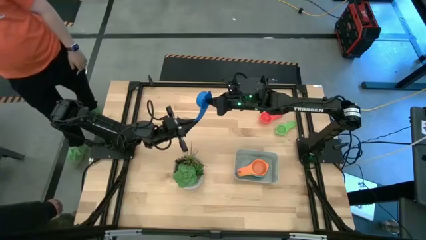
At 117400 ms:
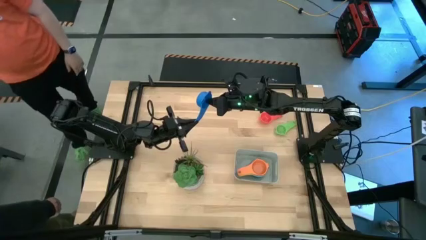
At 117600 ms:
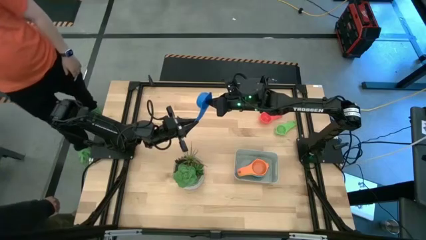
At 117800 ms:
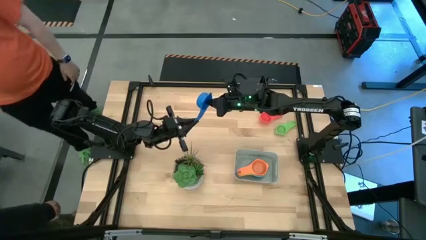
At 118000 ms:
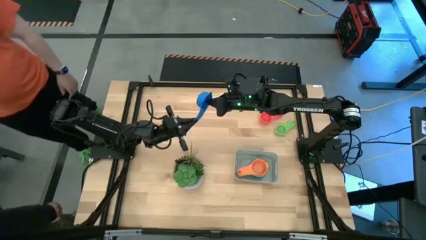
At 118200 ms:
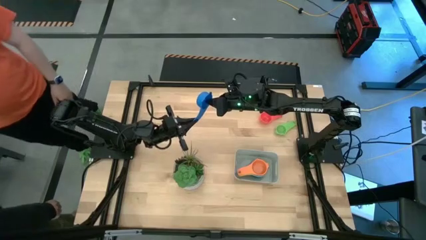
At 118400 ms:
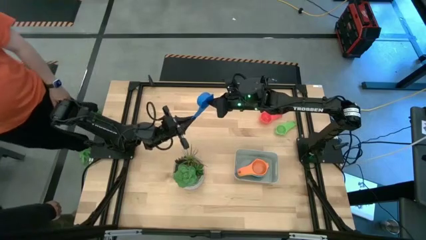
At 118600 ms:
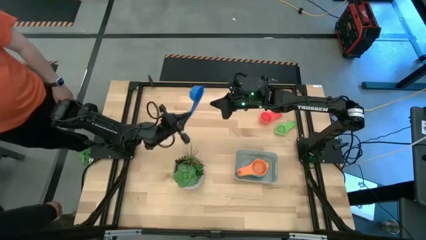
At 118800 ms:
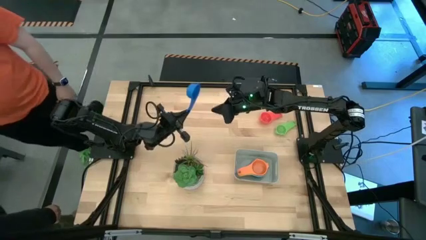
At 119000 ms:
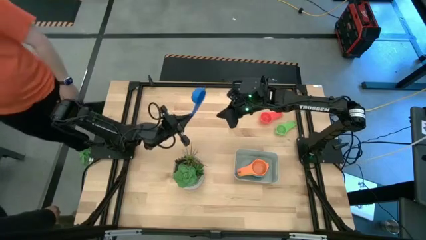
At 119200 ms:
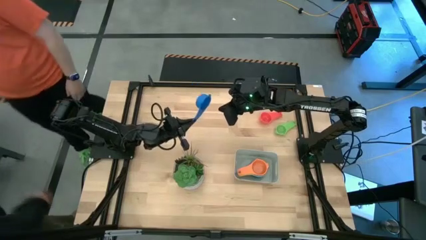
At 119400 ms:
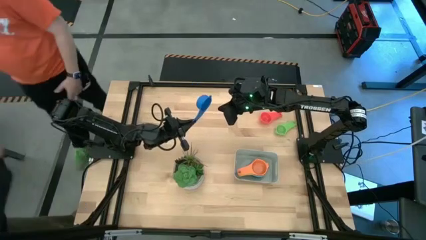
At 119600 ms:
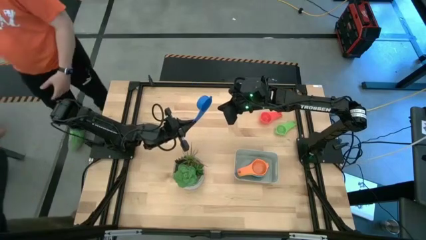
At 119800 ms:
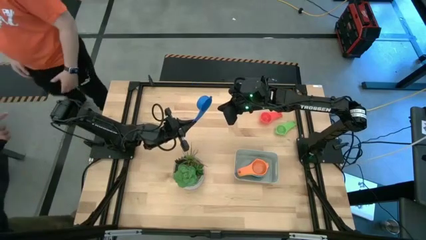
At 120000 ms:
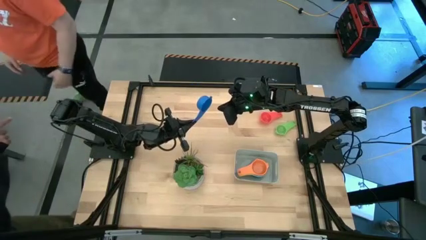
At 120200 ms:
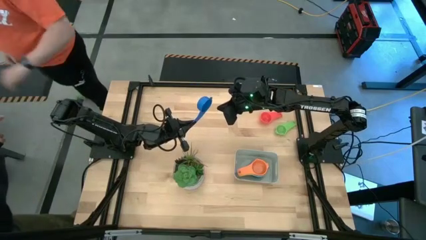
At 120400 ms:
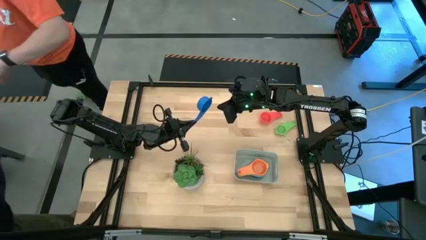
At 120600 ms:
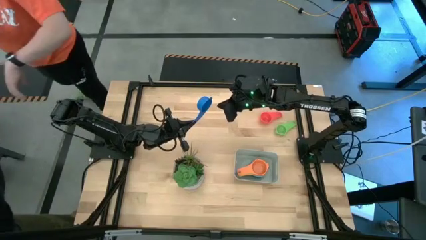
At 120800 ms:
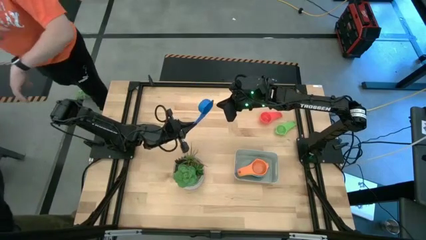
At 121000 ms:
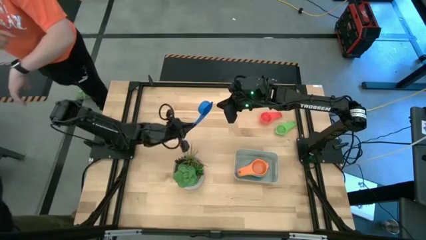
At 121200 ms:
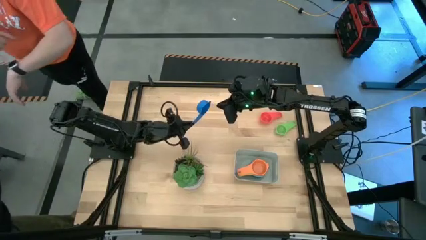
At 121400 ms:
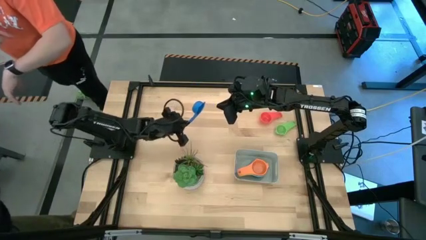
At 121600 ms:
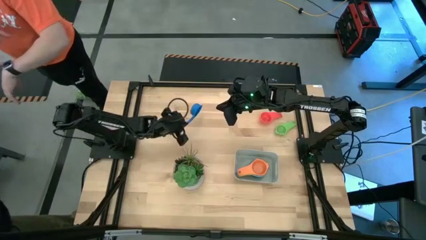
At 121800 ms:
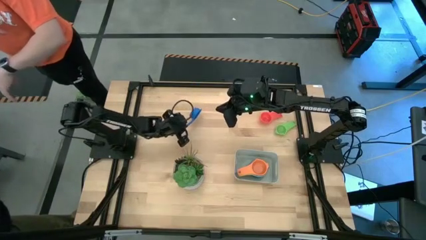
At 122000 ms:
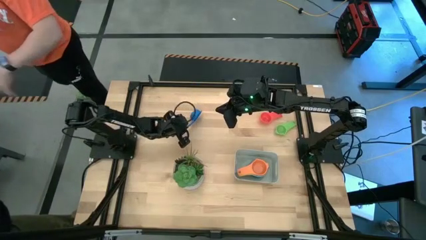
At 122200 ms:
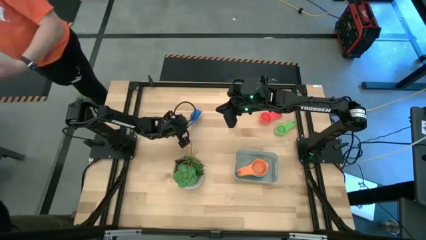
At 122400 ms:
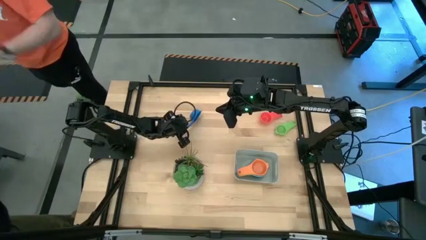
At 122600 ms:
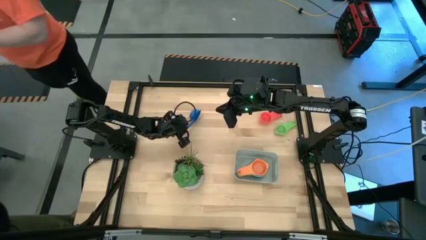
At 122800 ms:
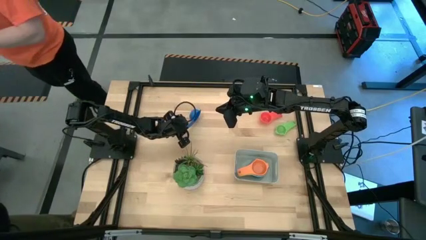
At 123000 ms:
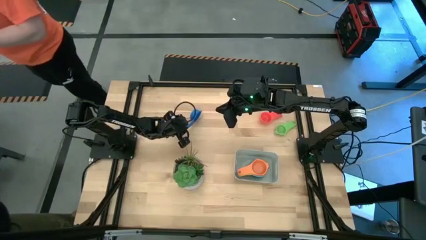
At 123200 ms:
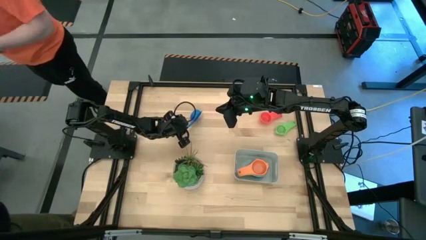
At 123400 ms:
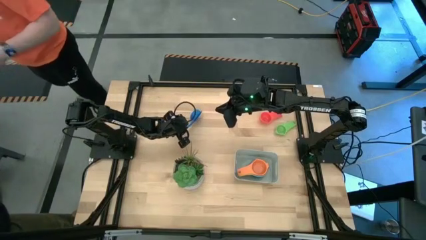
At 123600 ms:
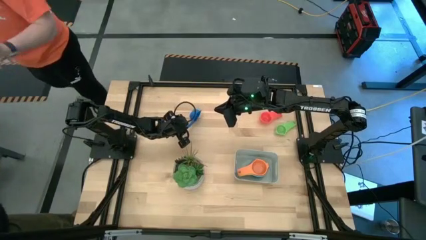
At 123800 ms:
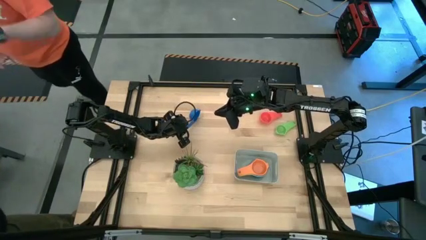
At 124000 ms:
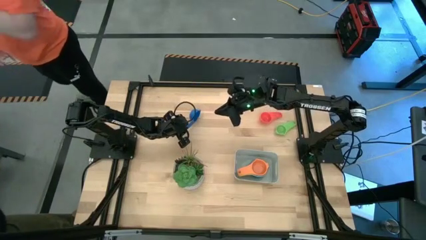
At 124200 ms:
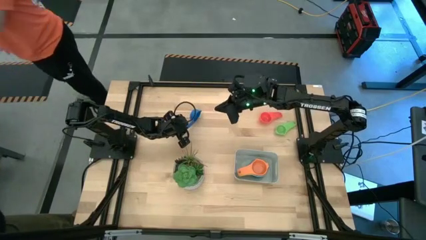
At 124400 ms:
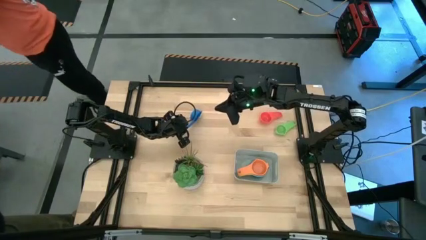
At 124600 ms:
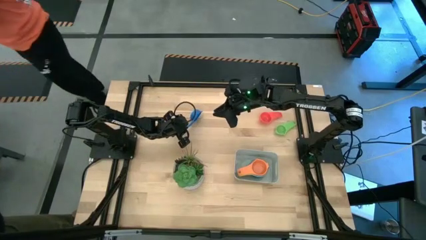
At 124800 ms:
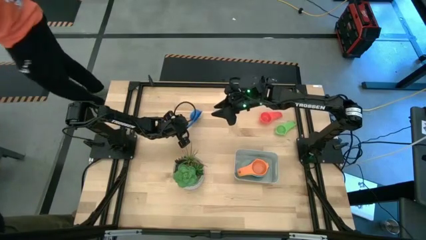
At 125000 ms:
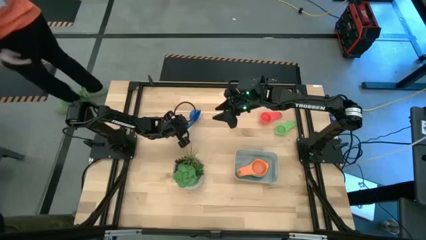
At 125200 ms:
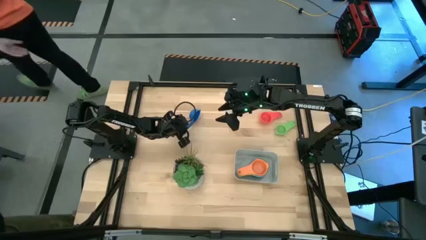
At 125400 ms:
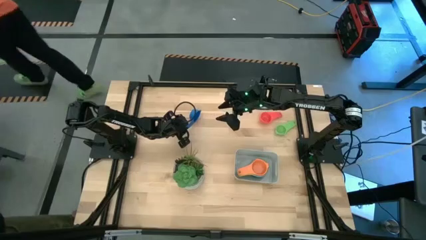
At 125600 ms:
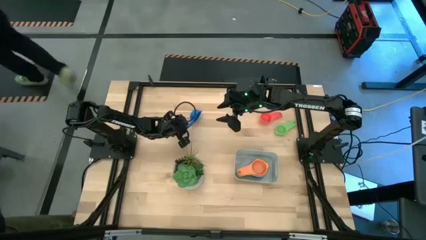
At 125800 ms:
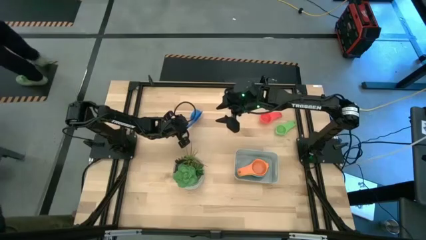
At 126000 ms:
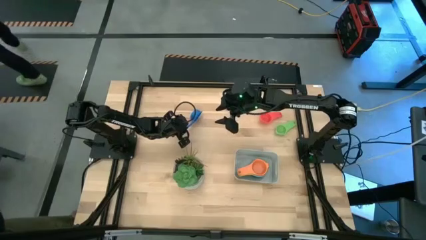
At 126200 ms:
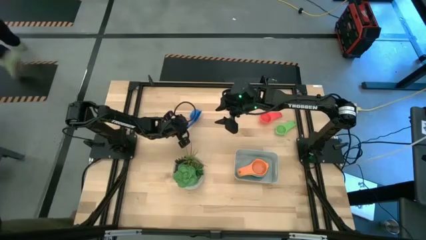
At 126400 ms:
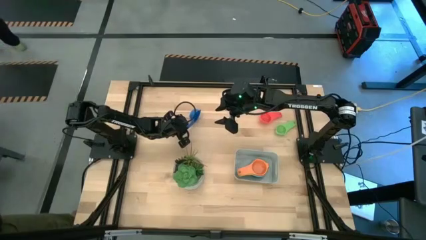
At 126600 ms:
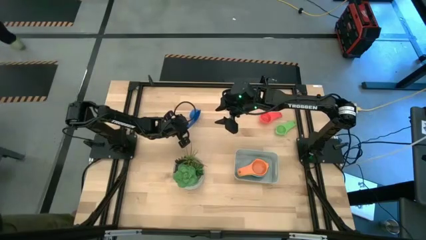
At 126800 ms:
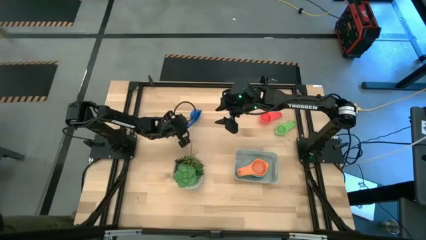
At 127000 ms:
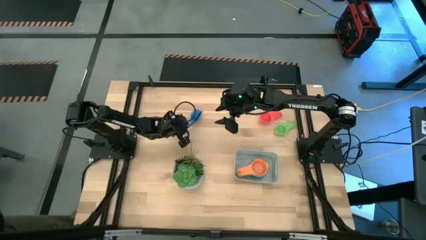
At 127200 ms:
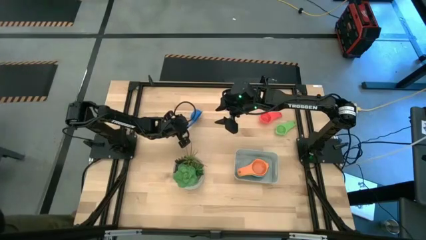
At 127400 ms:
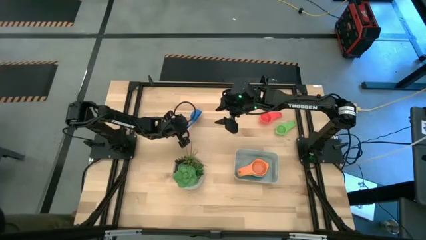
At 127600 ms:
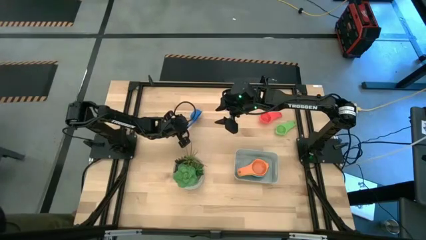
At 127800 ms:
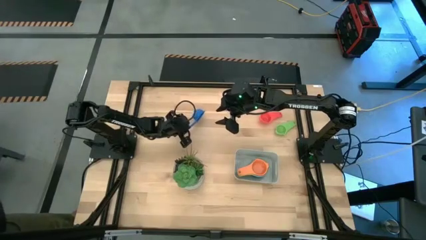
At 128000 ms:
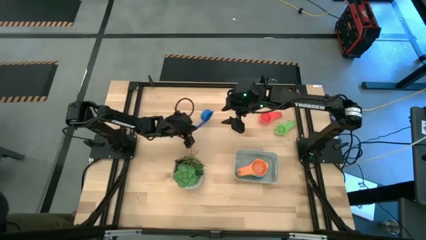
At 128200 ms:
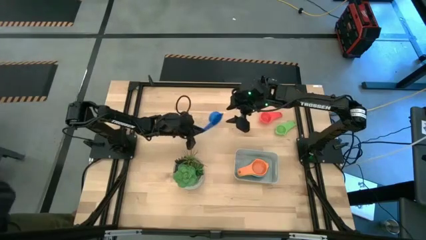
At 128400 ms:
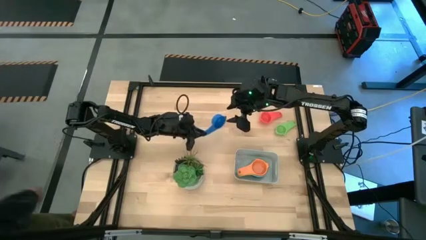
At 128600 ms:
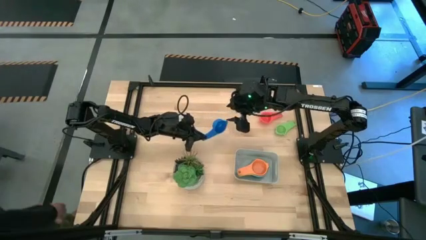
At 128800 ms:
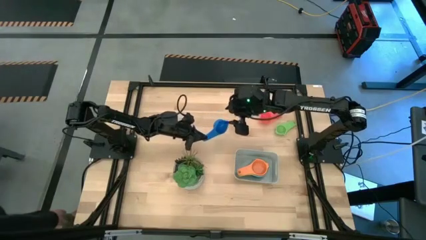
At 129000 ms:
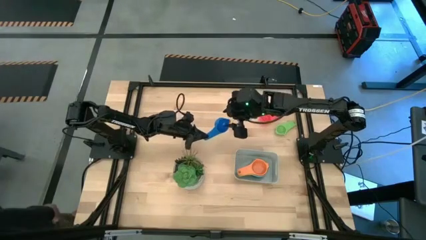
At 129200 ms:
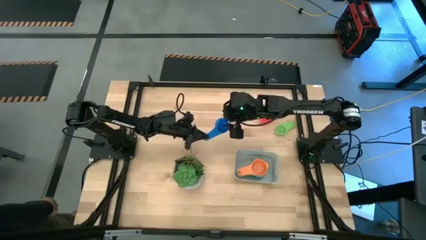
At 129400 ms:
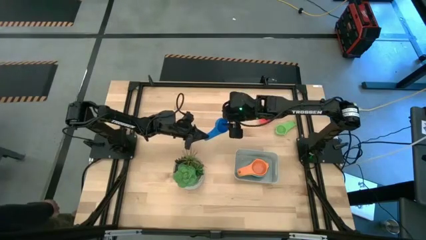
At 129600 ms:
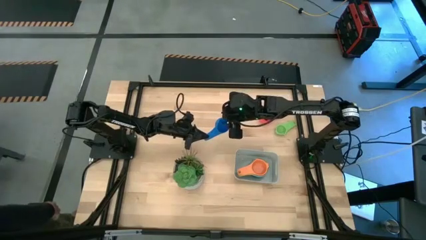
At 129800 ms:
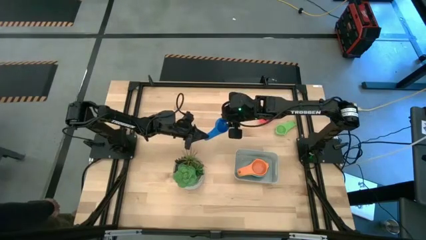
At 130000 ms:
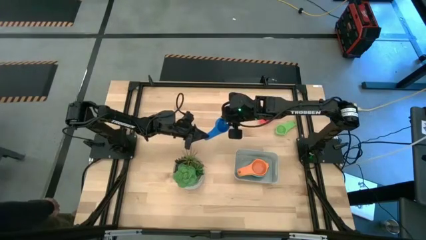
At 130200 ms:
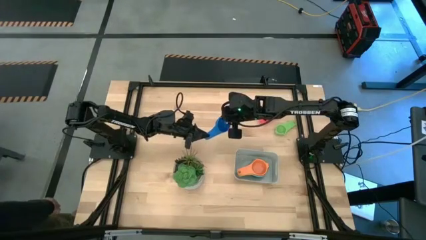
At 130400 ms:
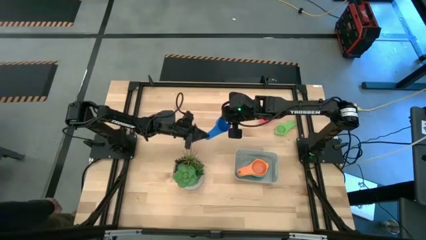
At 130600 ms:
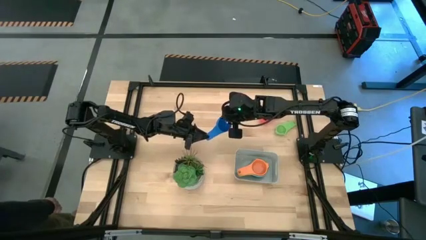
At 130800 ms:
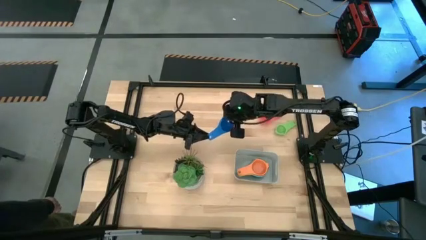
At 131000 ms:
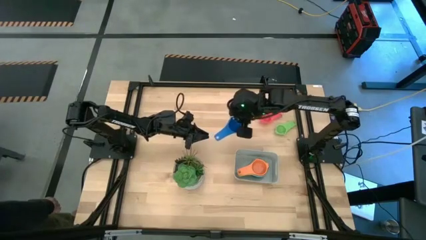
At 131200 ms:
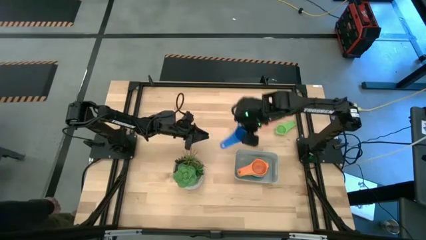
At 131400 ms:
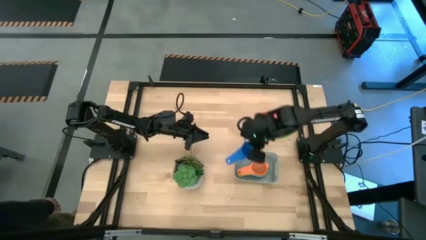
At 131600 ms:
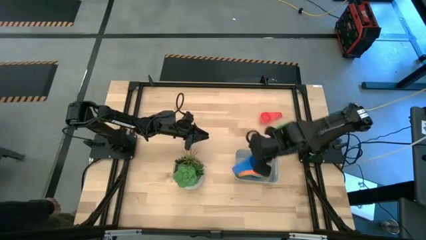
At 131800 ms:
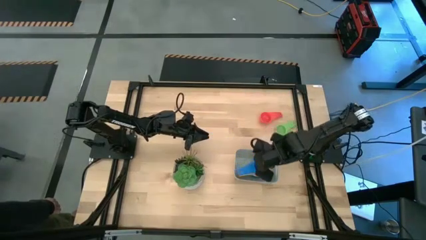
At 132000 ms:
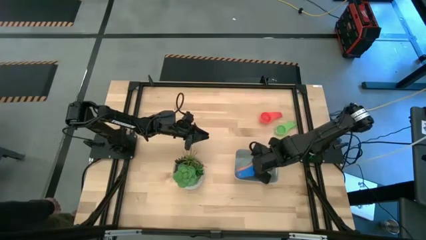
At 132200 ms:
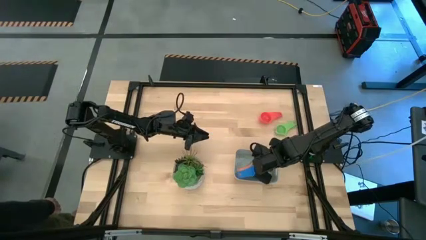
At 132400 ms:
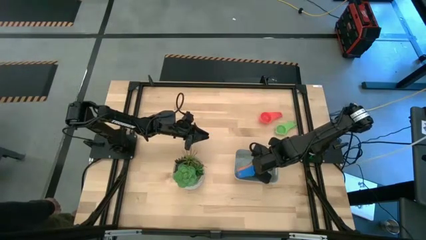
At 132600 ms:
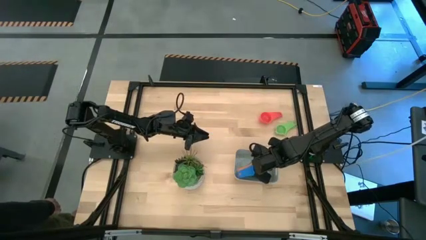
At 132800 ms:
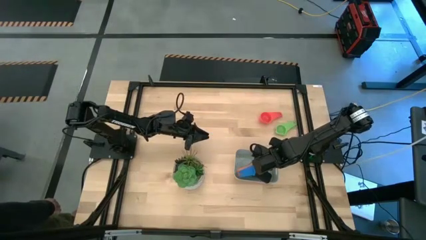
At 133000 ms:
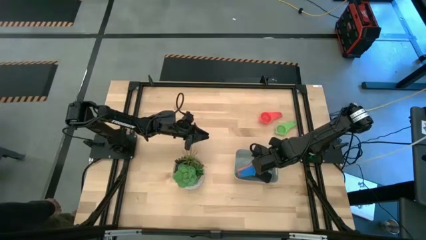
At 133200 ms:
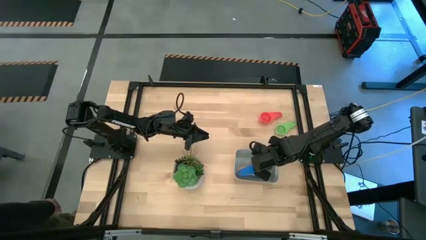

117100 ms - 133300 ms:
Task: Nest measuring cups in basket
Stack the blue measuring cup on top of the orange measuring cup in the grey bin
